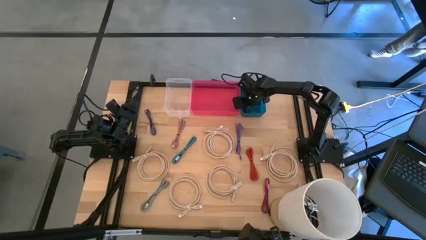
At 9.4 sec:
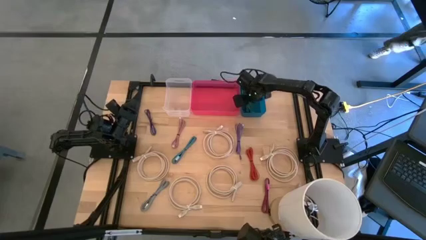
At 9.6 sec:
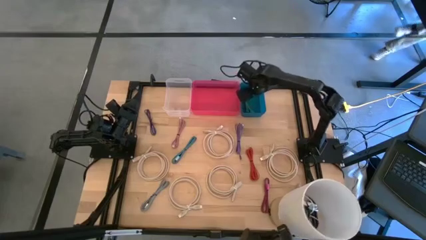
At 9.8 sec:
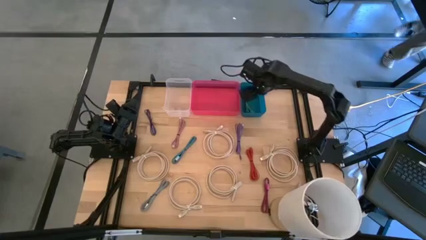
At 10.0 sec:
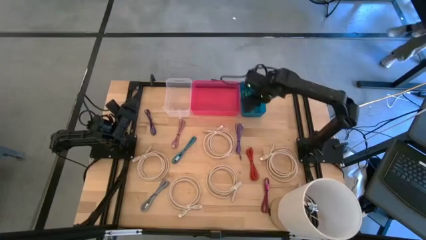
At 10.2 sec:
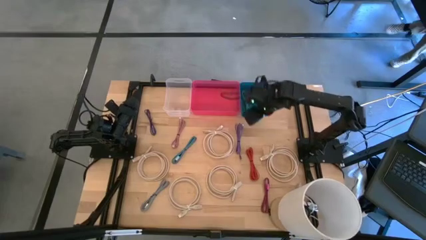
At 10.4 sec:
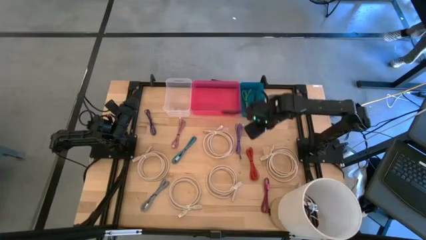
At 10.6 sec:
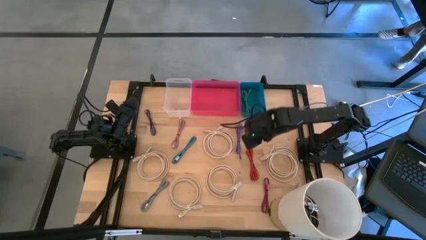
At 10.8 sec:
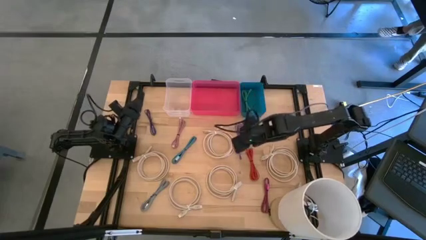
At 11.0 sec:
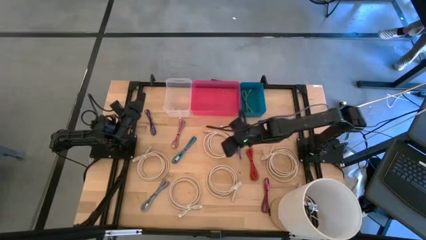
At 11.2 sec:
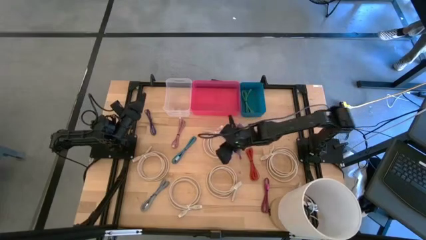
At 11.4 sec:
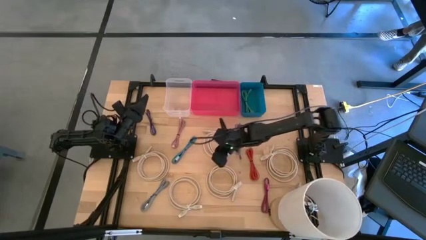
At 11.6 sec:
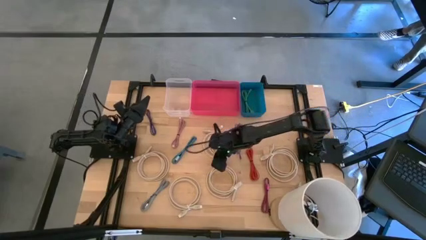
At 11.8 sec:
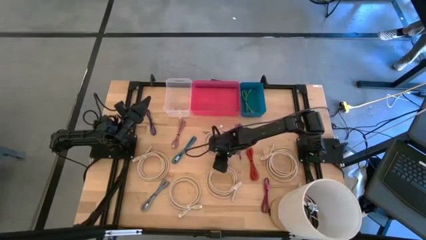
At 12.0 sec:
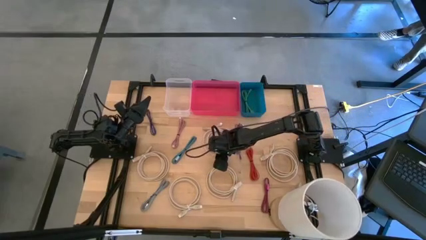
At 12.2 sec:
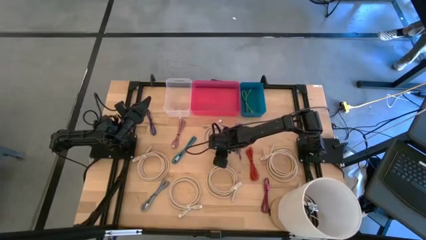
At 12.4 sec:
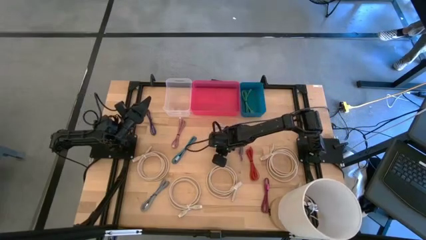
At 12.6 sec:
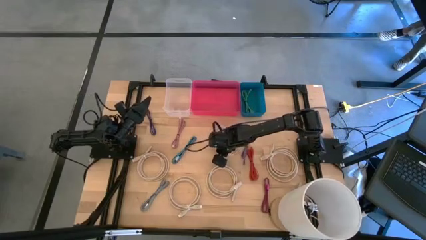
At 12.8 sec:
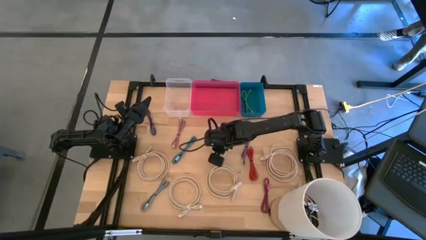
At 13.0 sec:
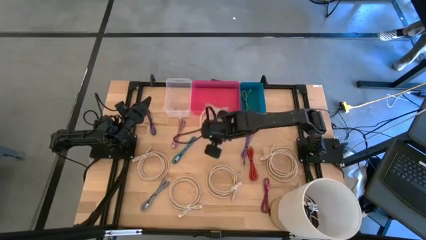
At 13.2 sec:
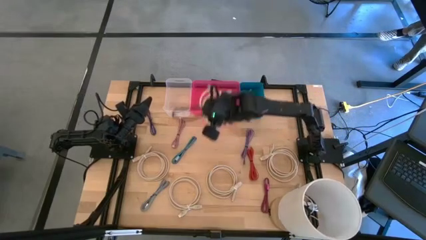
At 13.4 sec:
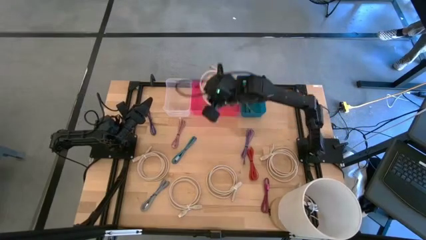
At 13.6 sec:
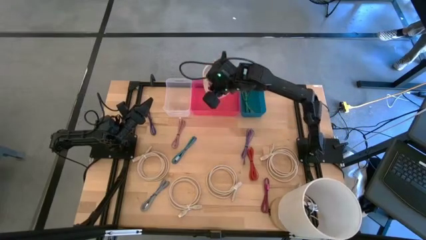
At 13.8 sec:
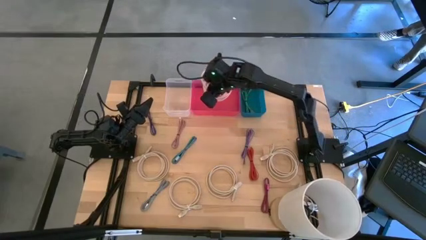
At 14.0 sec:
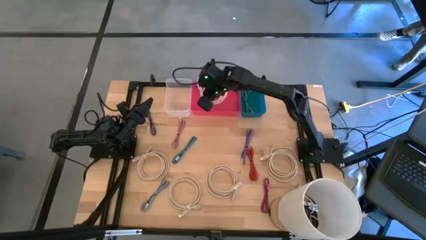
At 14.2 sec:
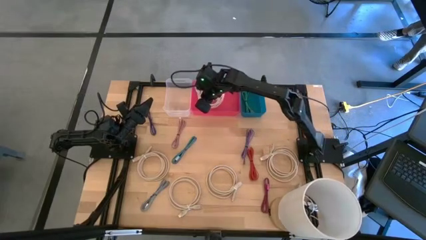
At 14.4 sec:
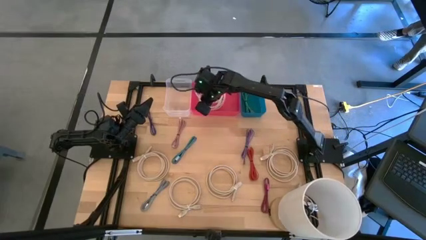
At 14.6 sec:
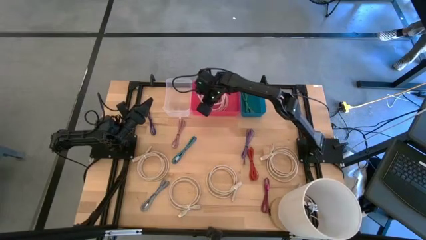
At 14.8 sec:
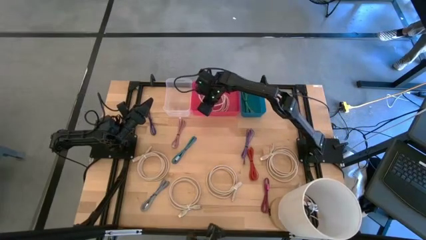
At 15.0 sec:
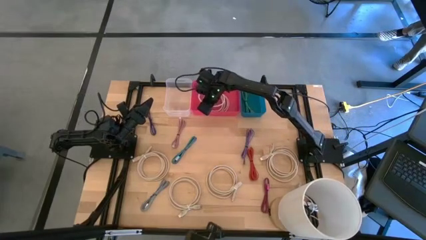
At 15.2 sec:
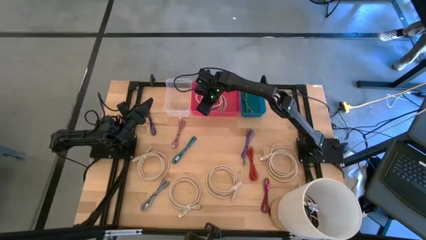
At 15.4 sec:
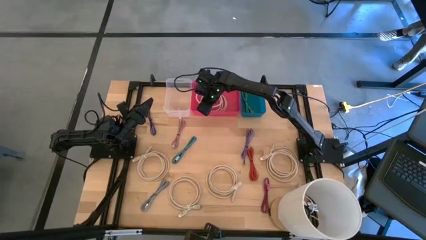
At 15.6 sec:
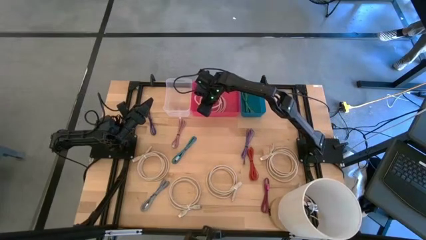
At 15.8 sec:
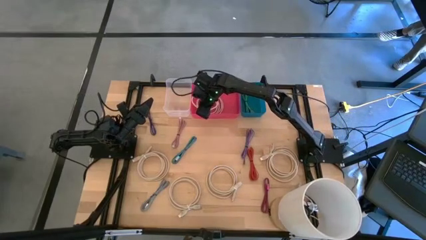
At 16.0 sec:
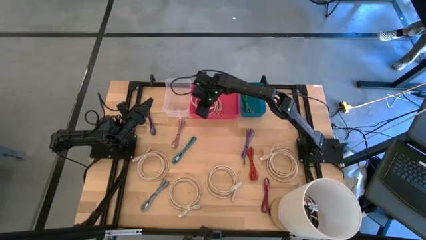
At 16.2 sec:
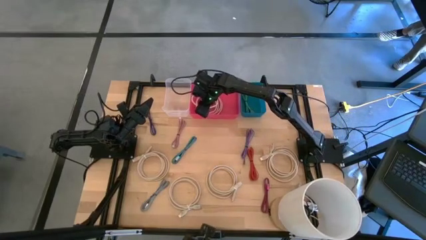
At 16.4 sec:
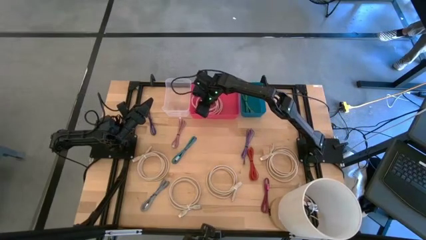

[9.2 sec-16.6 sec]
Task: Pick & Place USB Port
Put the light brown HDMI cable into the pink bin

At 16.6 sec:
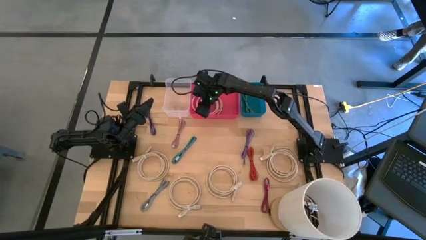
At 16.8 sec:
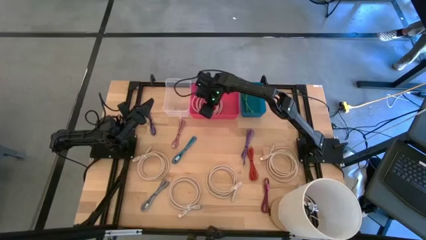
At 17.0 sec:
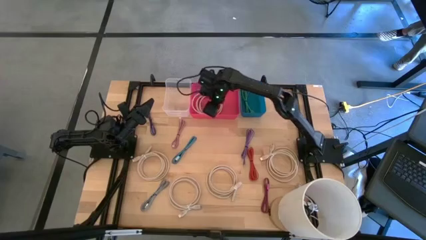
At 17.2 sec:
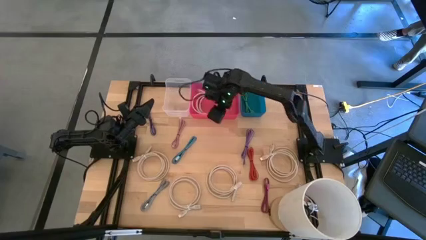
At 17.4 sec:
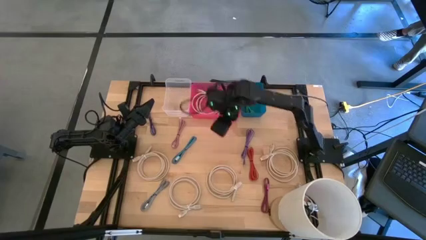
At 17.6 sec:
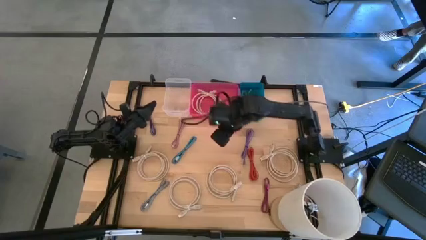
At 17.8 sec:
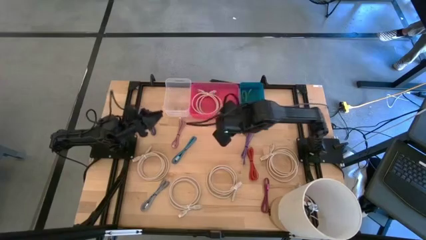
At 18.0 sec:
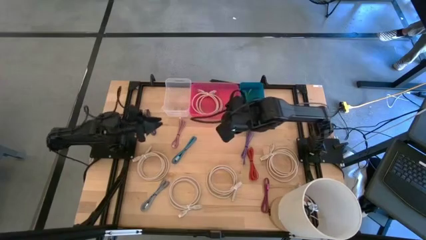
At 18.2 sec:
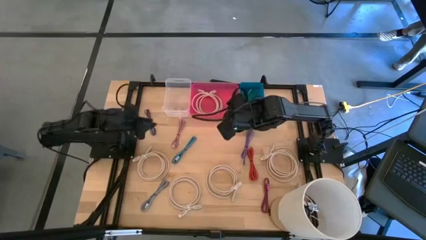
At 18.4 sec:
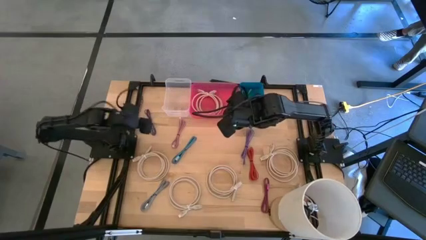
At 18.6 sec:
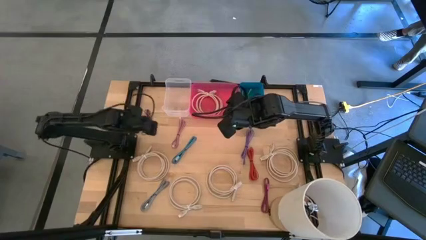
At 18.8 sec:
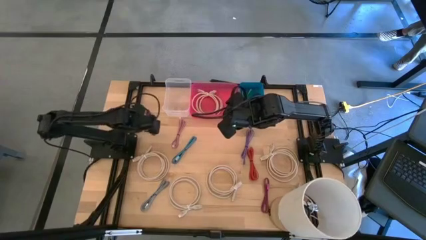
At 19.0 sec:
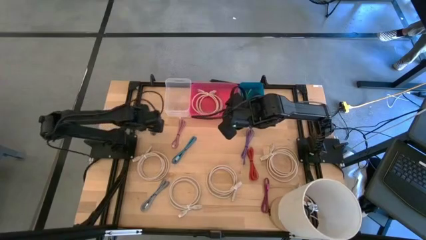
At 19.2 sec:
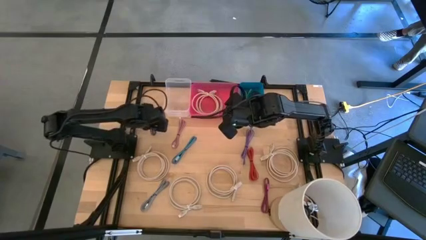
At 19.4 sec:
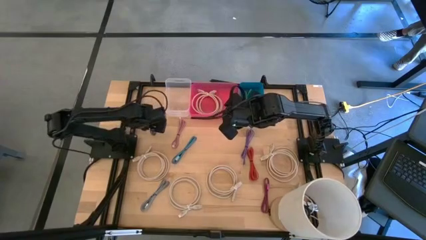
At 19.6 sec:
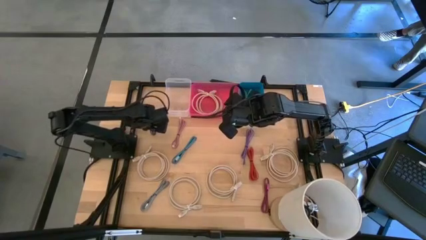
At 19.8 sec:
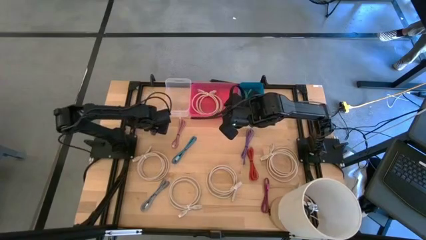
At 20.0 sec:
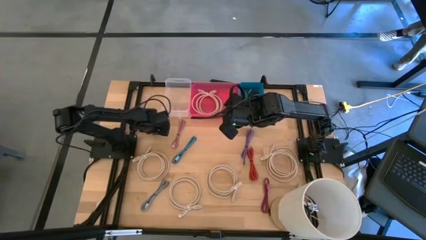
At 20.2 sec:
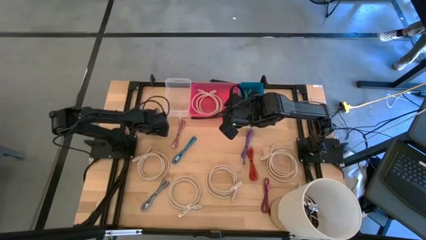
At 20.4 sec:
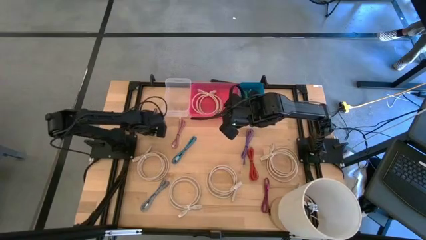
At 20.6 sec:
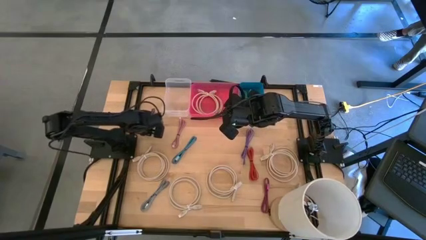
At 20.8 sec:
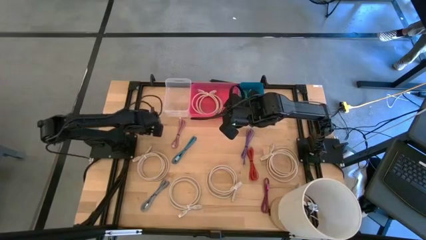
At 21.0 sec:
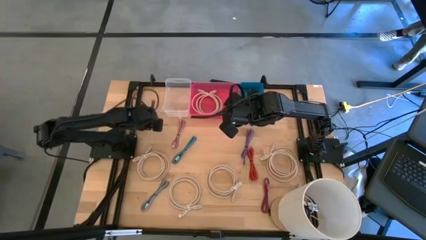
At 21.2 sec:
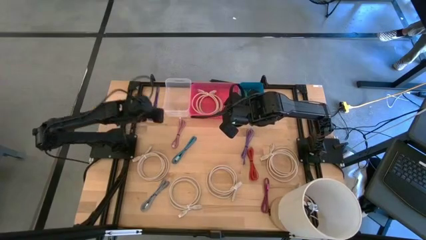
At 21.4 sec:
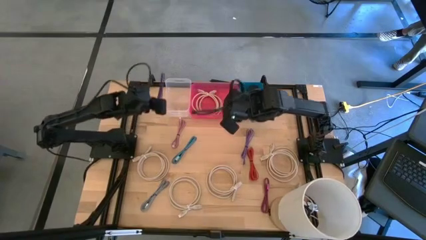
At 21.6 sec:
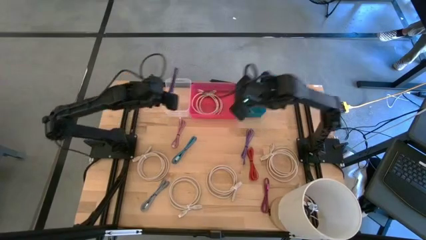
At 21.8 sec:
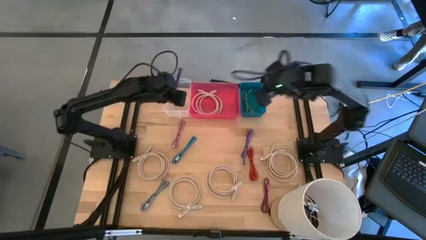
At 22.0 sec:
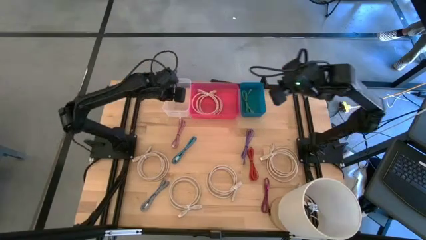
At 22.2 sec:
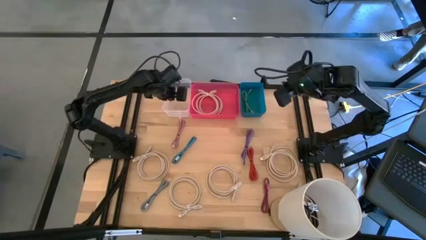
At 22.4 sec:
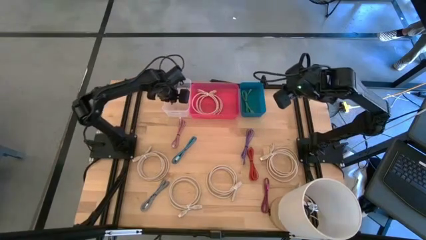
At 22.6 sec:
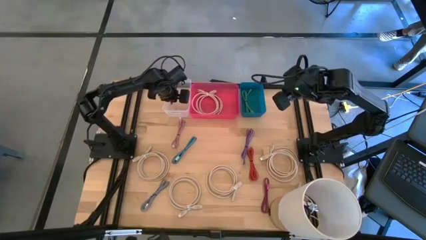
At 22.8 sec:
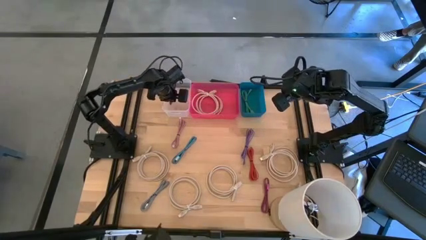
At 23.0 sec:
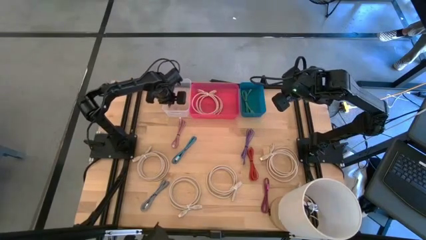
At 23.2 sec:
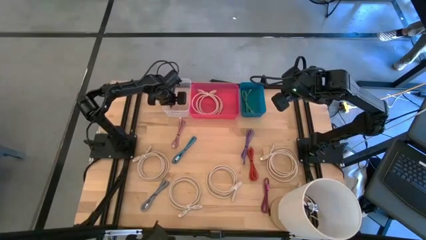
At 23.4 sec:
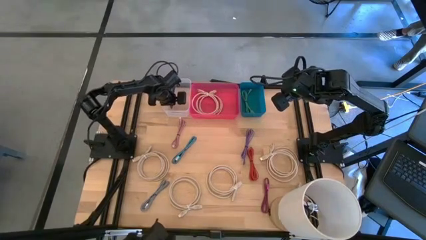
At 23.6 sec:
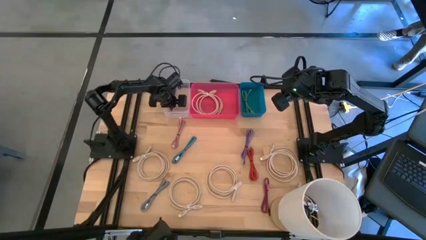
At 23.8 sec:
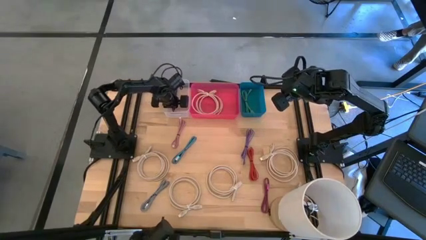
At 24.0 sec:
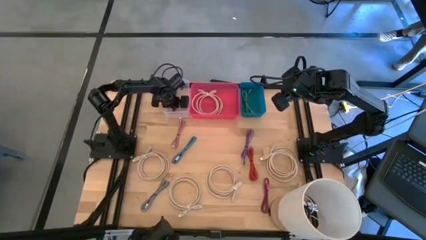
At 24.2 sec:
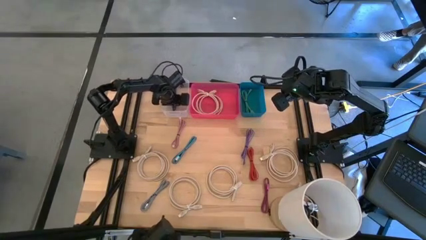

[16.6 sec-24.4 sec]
Put the violet and black charger cable into the transparent bin
